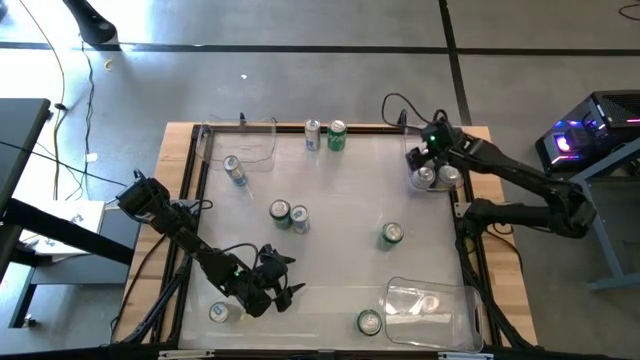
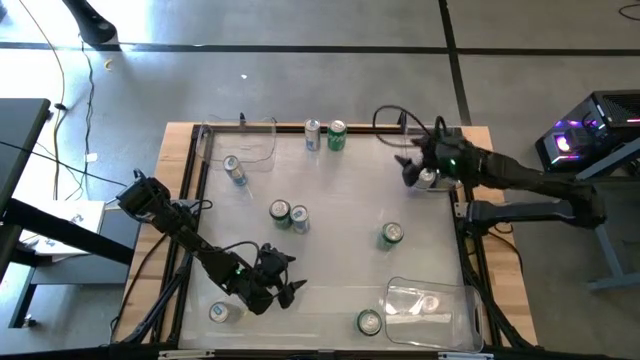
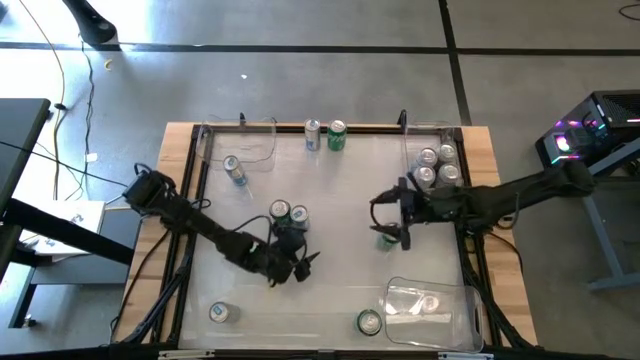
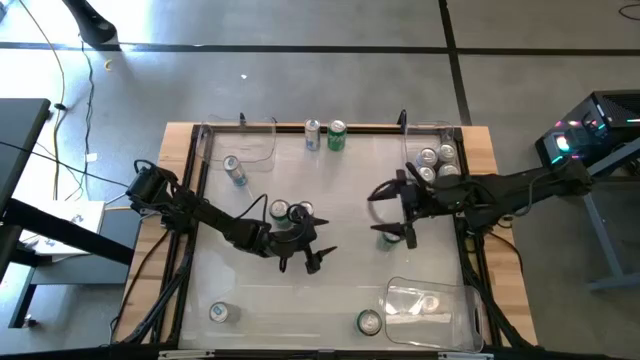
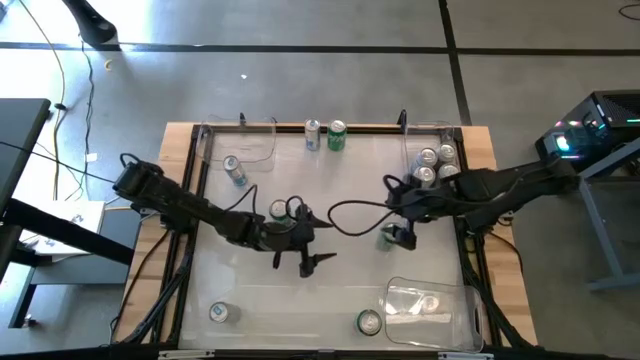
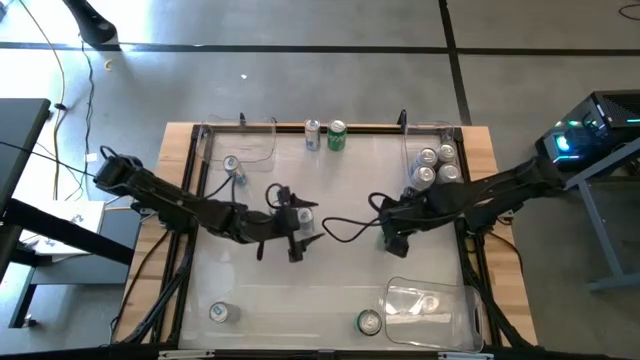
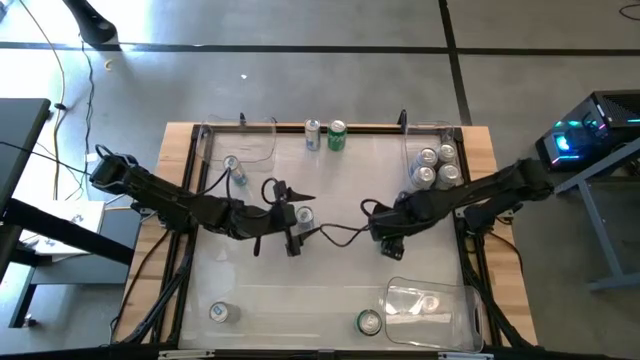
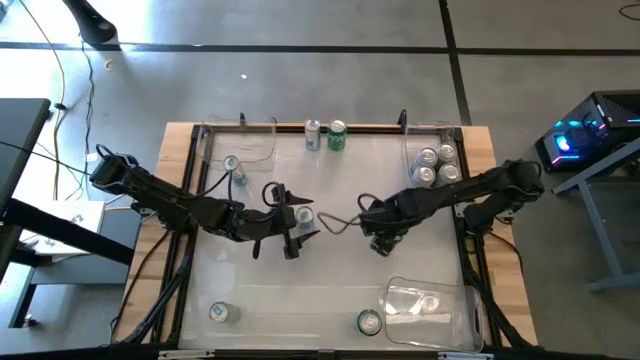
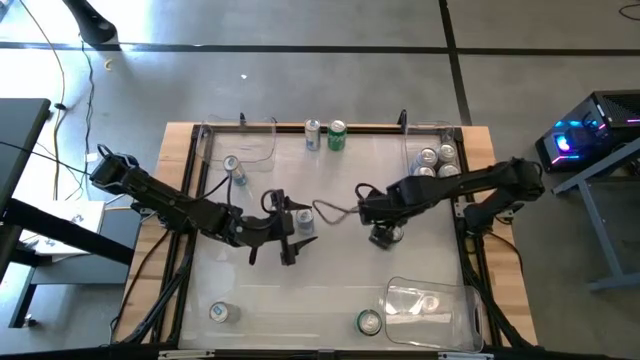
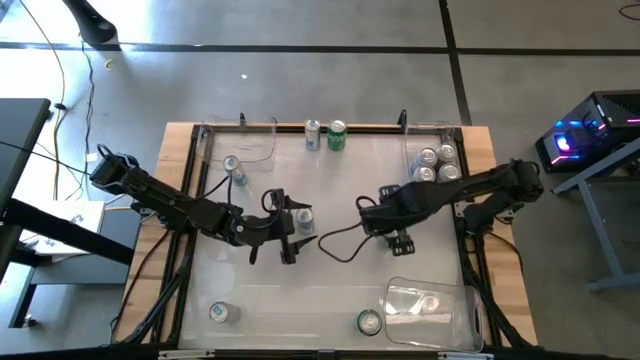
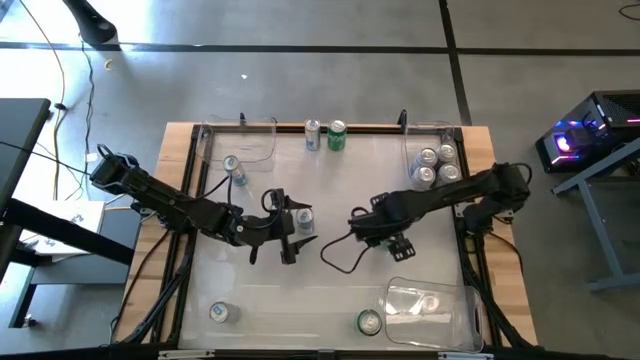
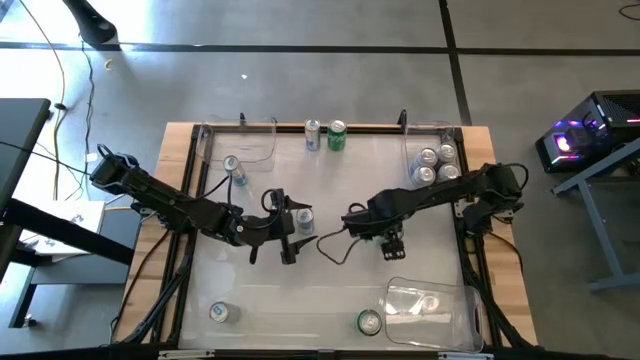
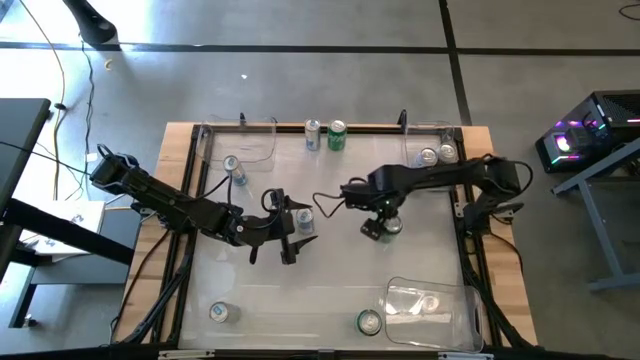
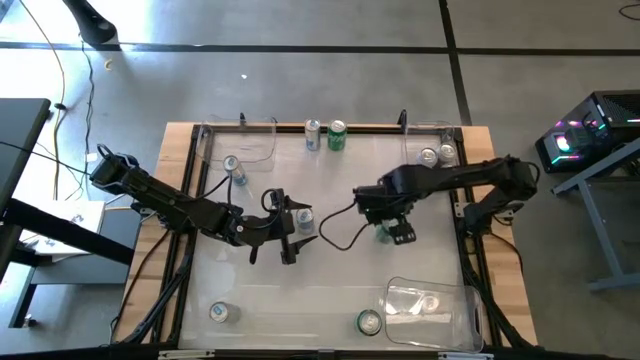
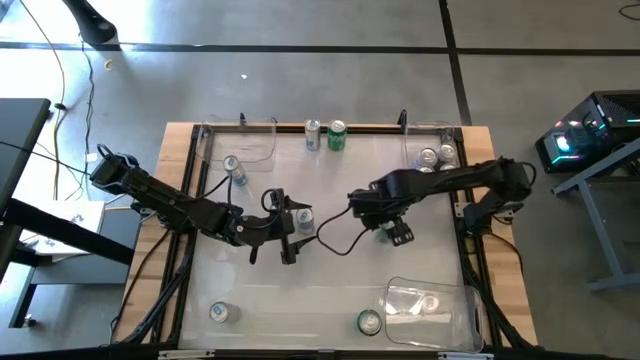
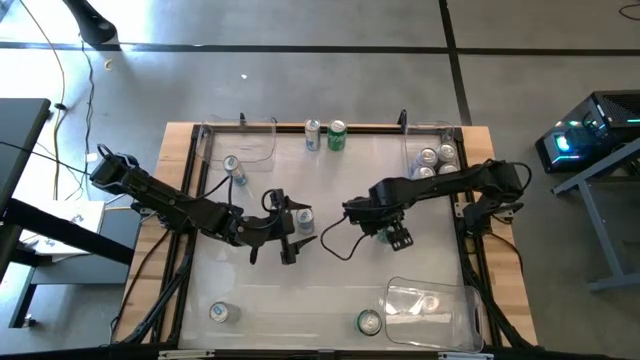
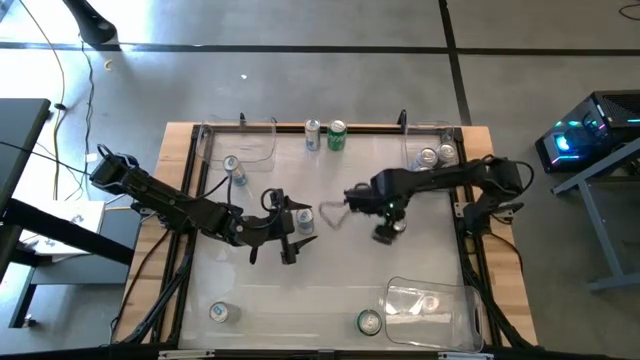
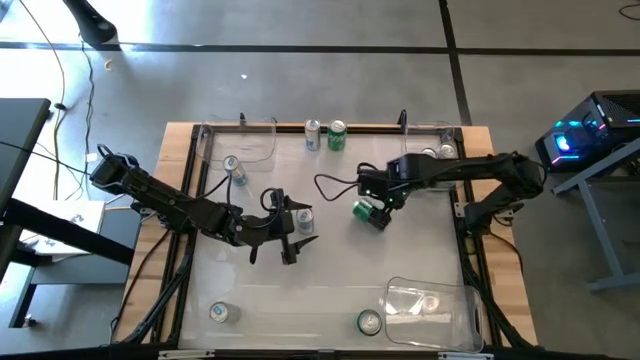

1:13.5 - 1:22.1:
Task: Sort soda cans
Put the middle right green soda can into the bottom transparent bin

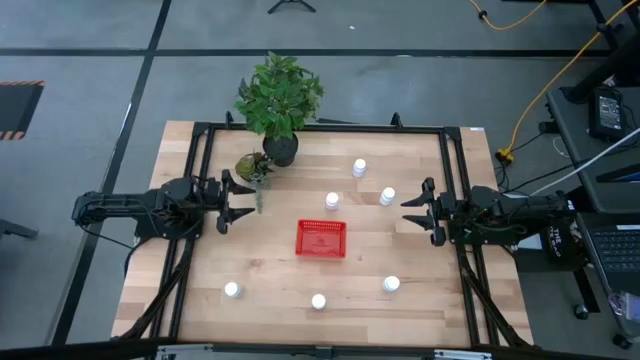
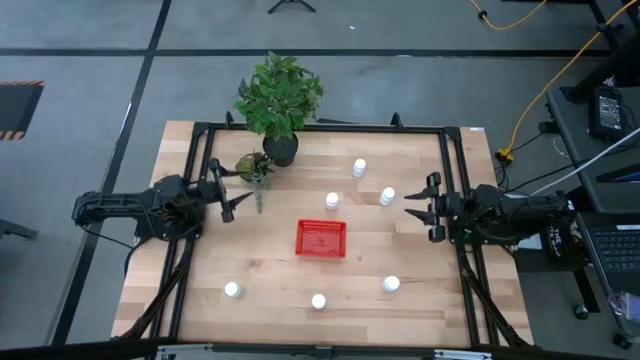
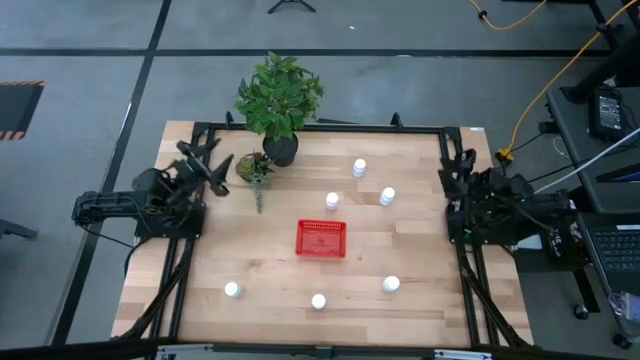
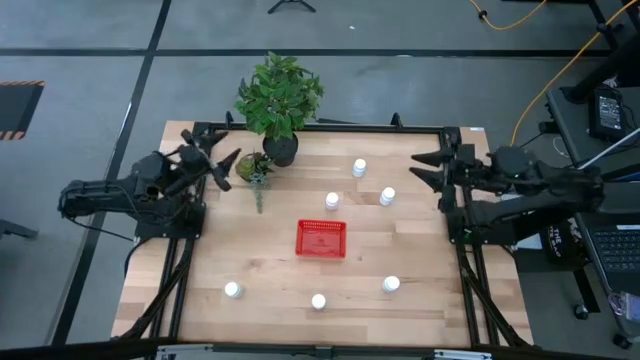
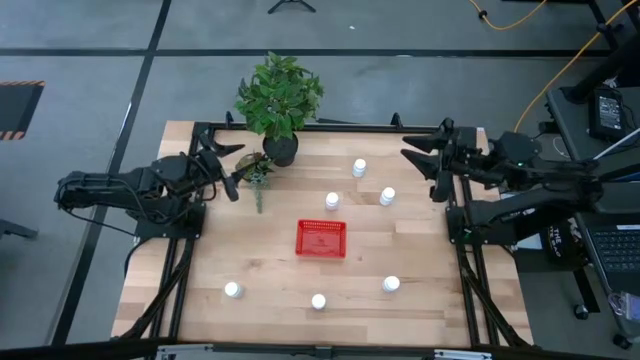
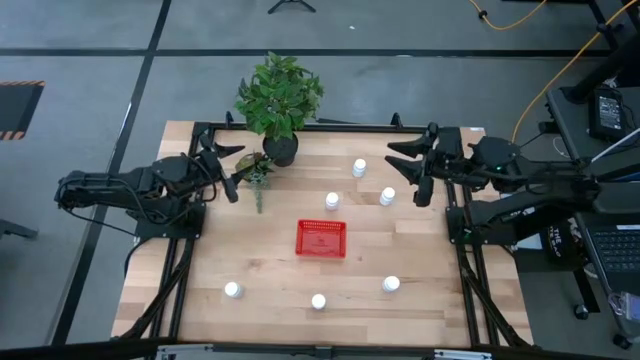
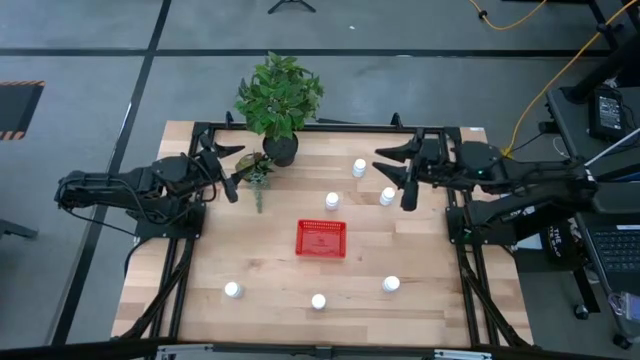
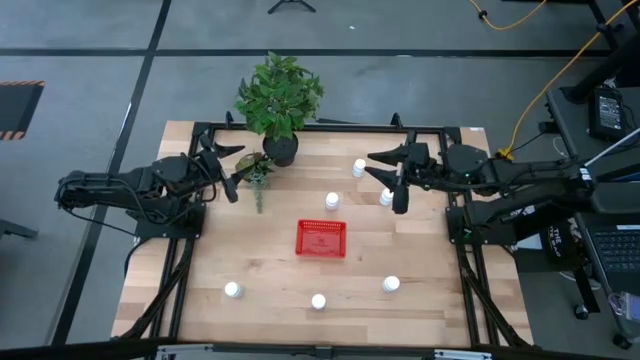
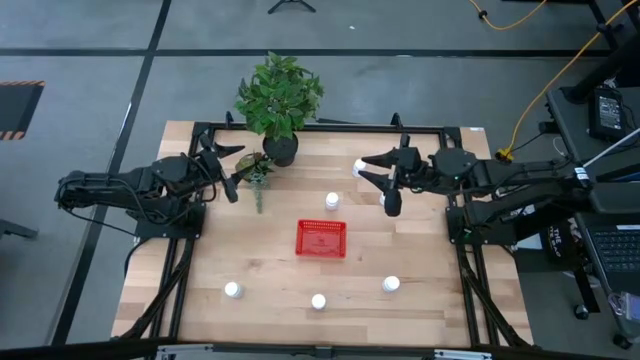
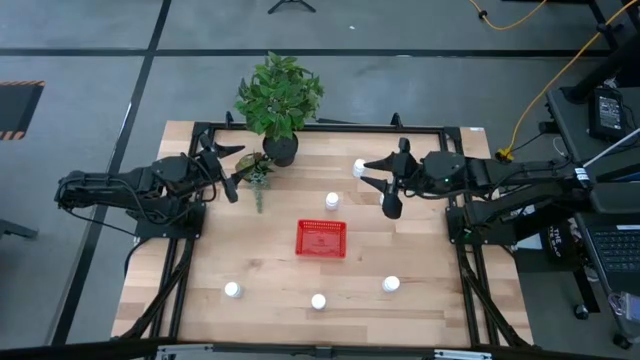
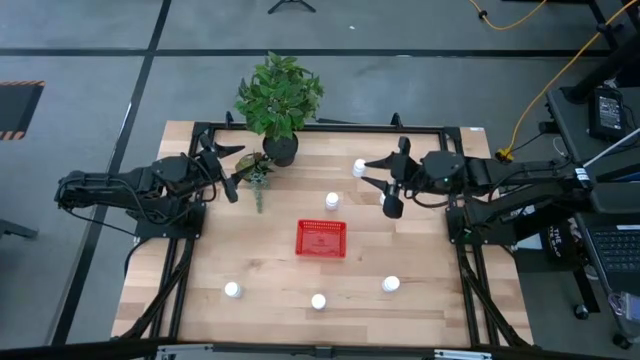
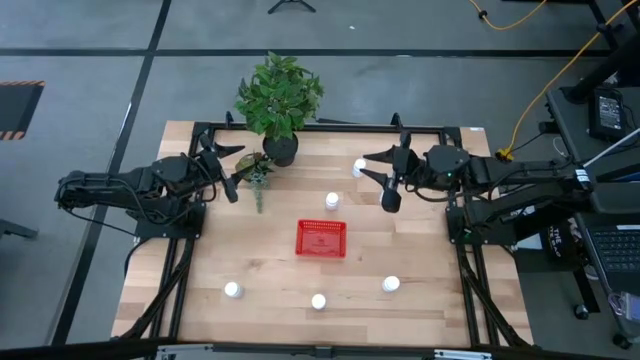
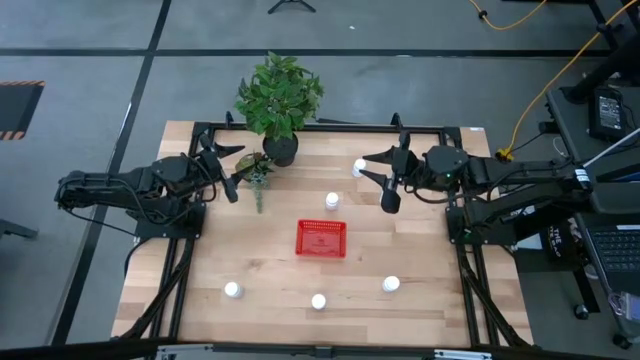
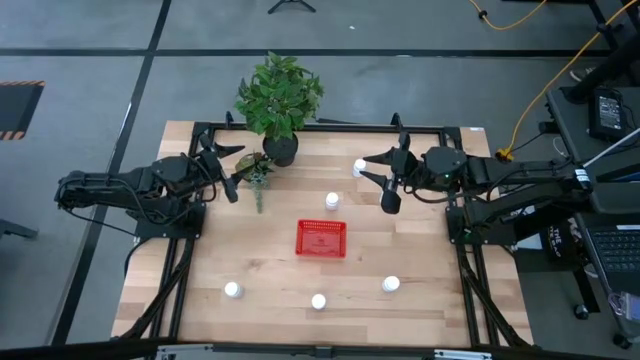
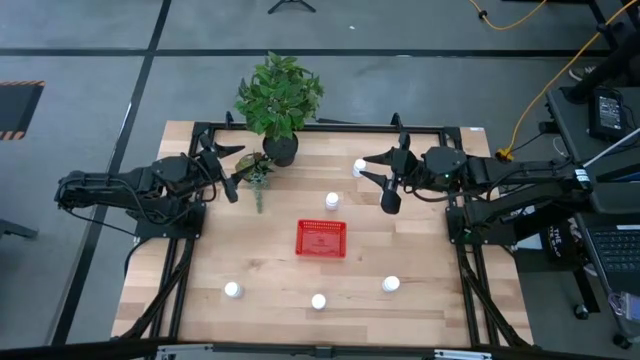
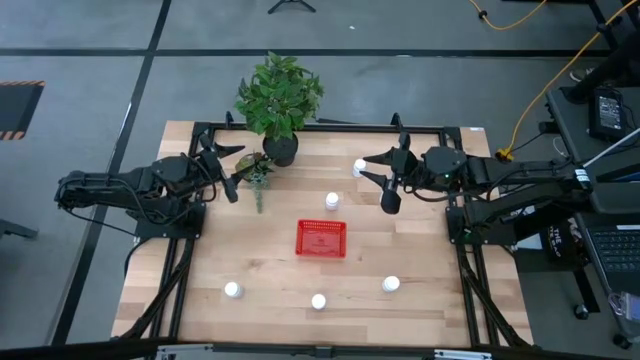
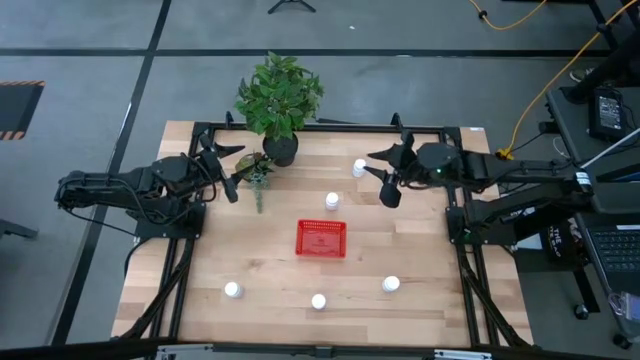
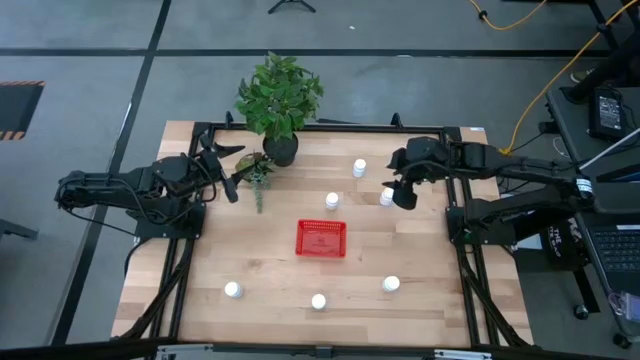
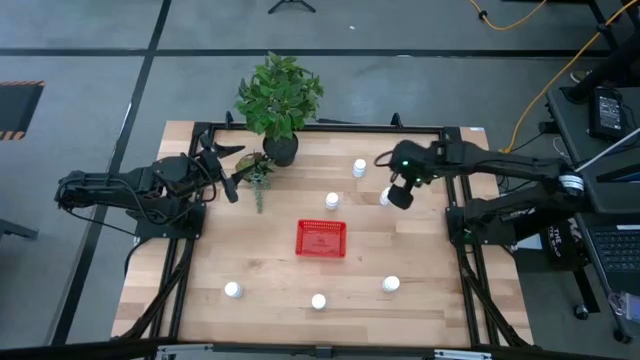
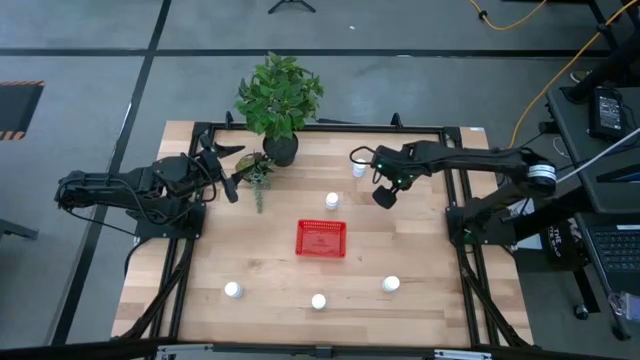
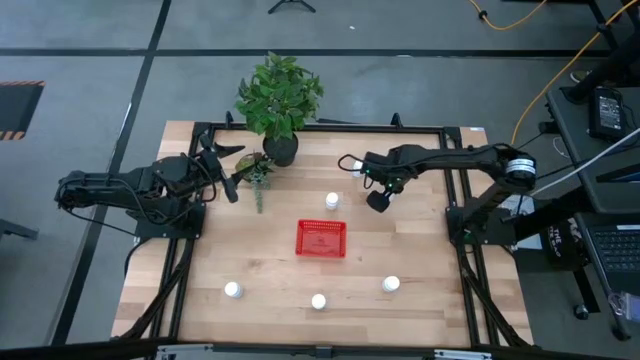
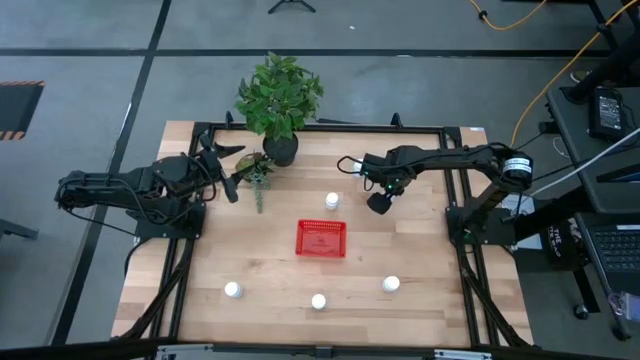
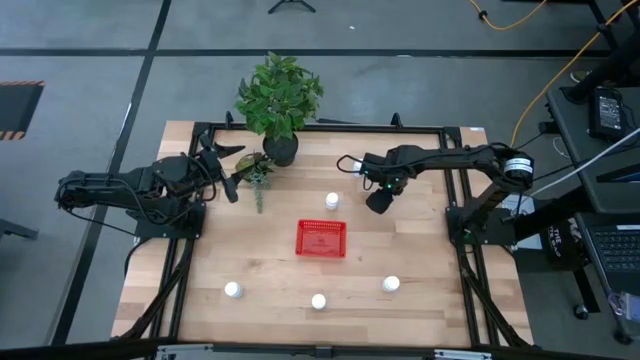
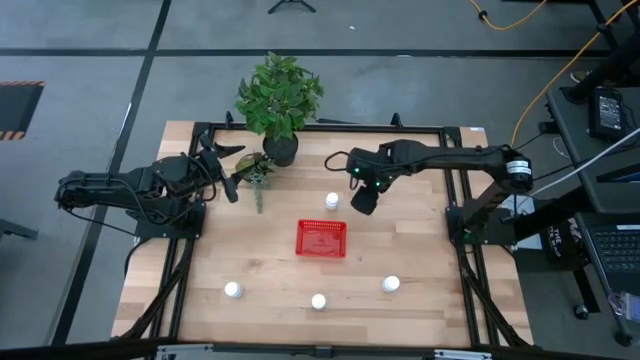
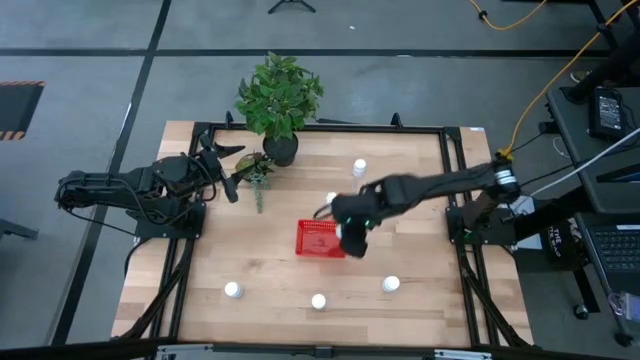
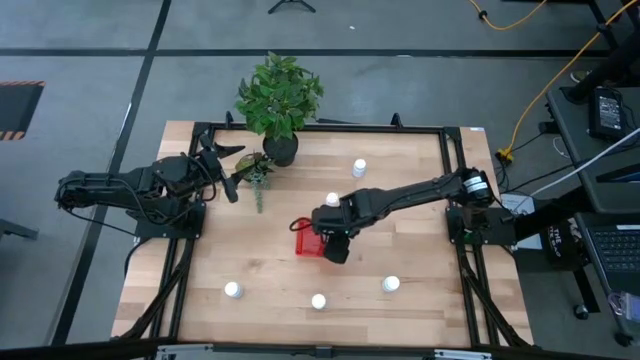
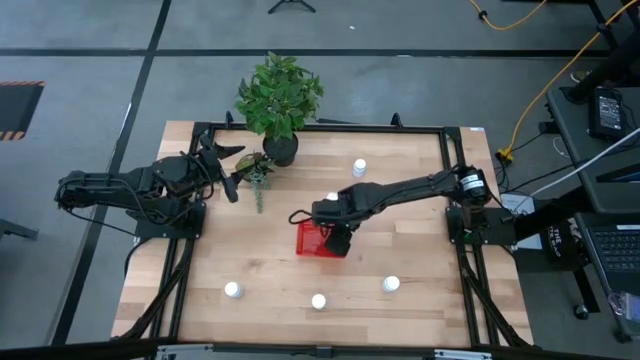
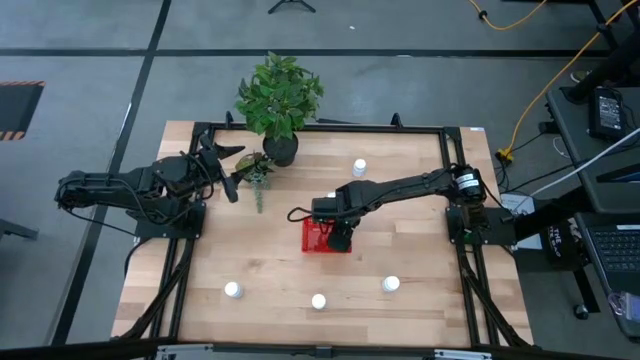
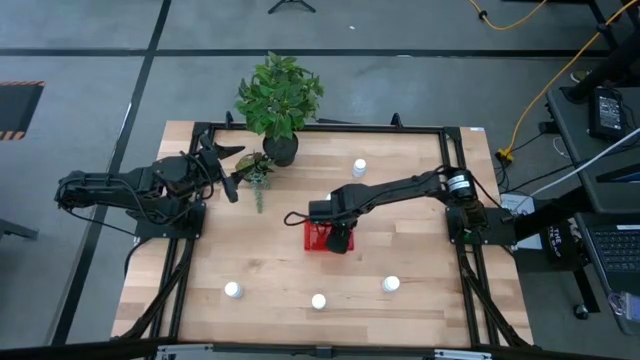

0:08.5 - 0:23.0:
Task: Pick and place pill bottles into a basket
Put the white medicine bottle into the red basket
